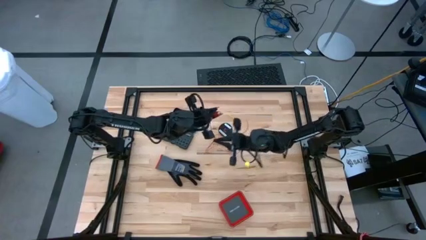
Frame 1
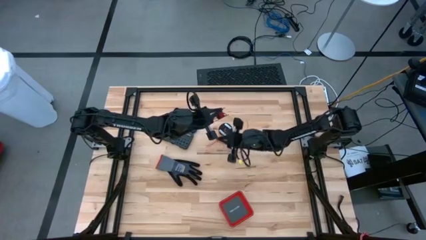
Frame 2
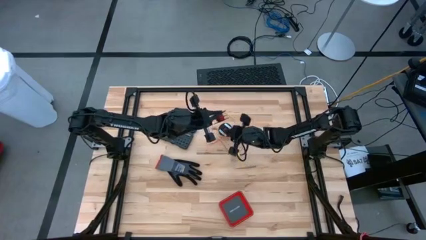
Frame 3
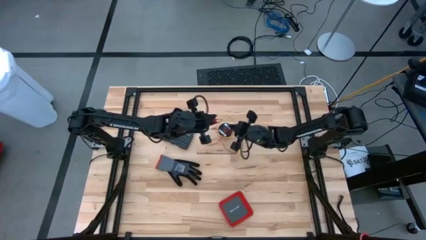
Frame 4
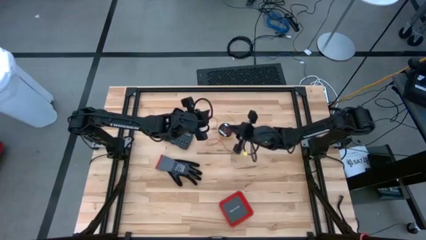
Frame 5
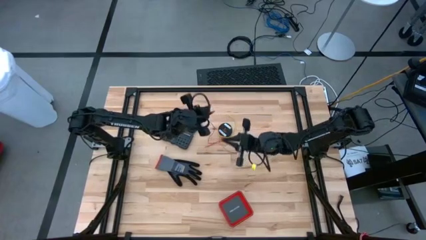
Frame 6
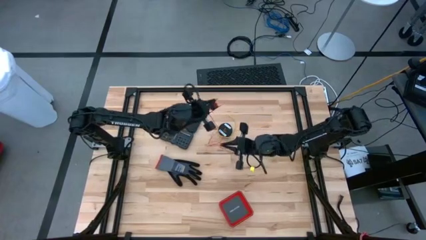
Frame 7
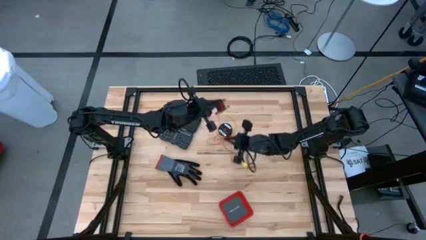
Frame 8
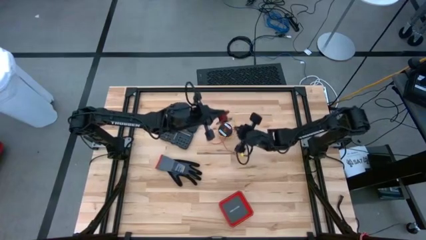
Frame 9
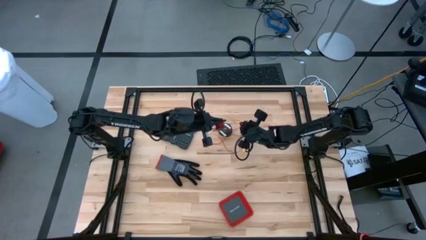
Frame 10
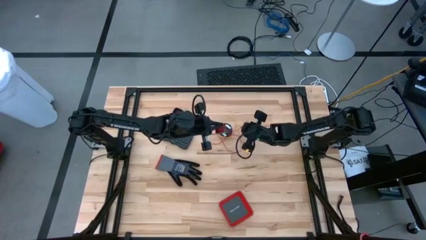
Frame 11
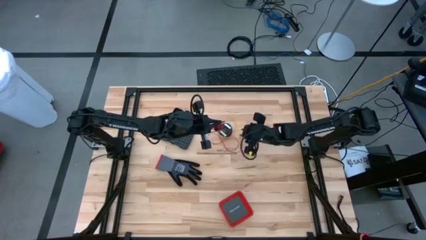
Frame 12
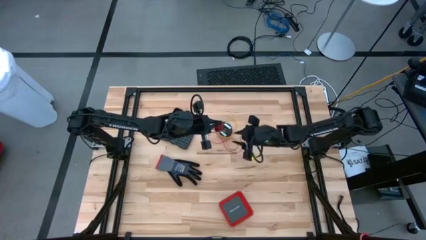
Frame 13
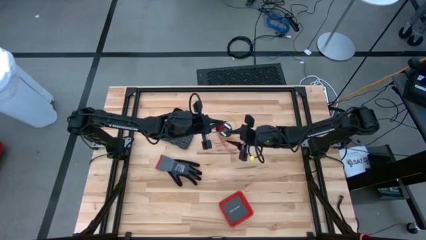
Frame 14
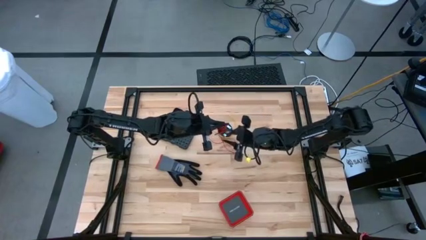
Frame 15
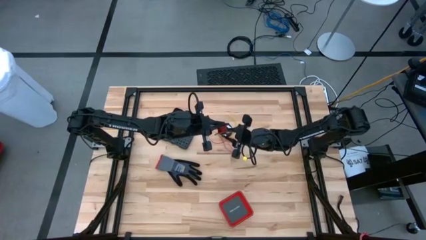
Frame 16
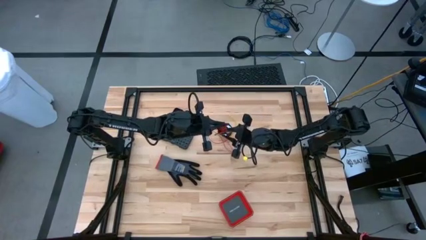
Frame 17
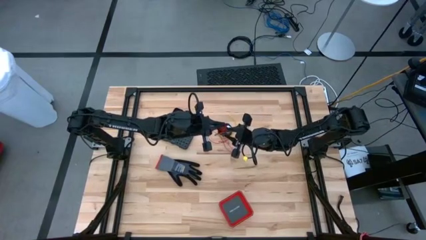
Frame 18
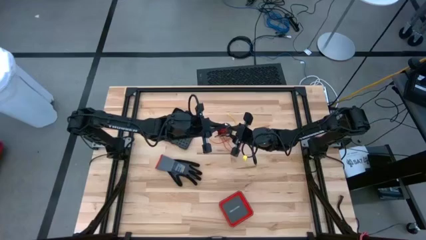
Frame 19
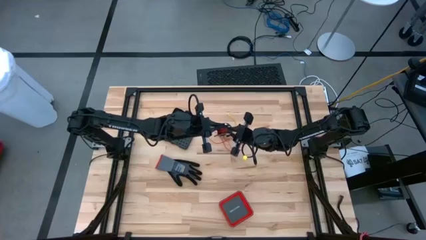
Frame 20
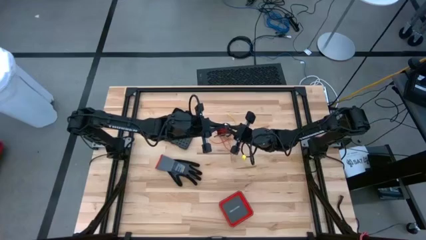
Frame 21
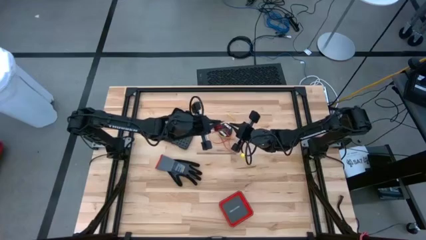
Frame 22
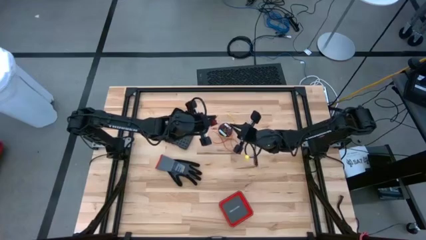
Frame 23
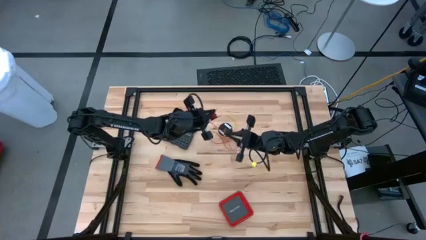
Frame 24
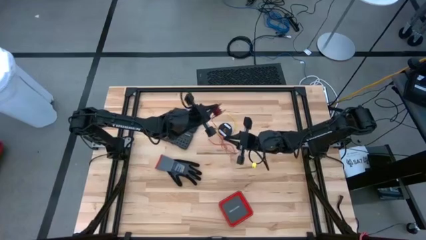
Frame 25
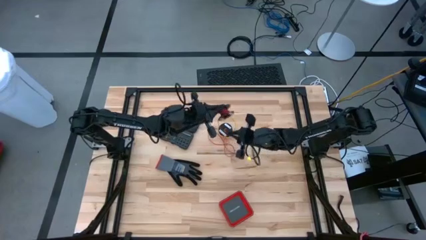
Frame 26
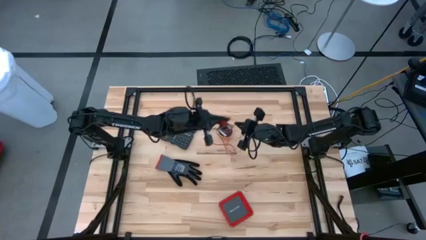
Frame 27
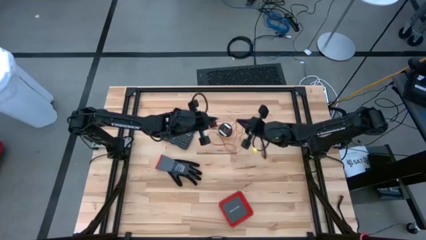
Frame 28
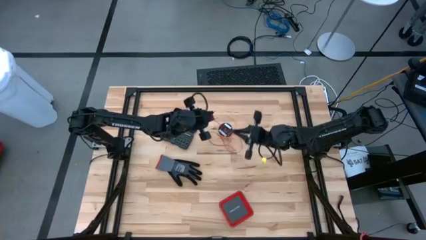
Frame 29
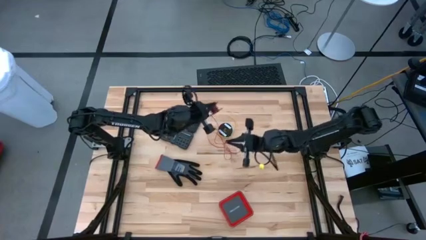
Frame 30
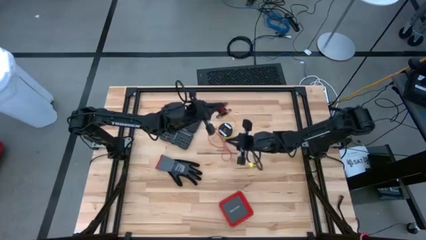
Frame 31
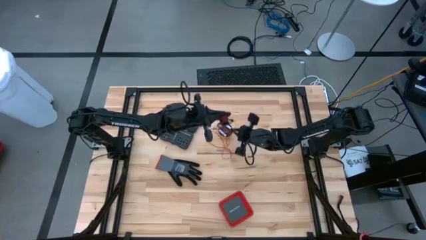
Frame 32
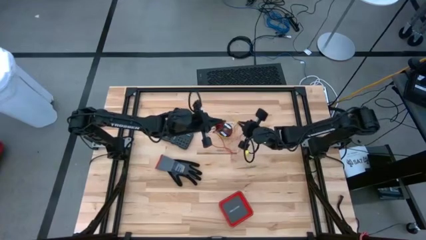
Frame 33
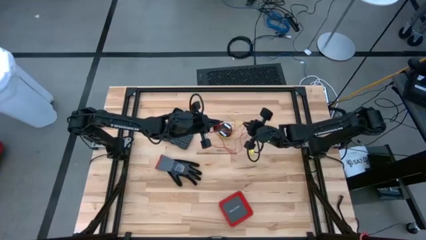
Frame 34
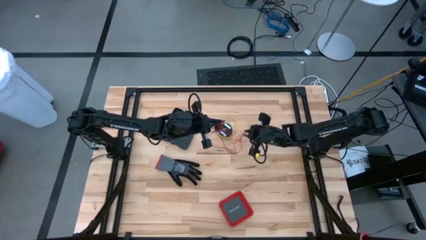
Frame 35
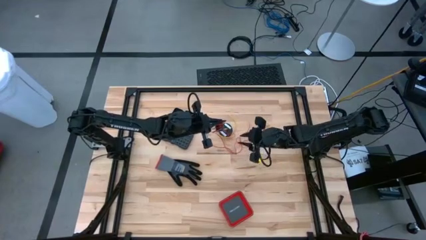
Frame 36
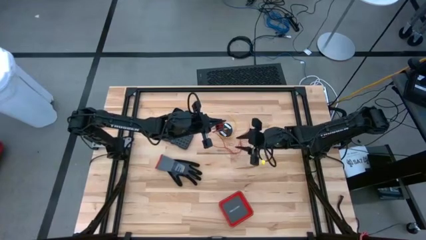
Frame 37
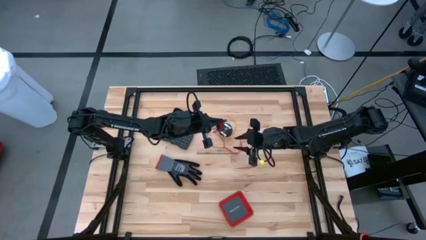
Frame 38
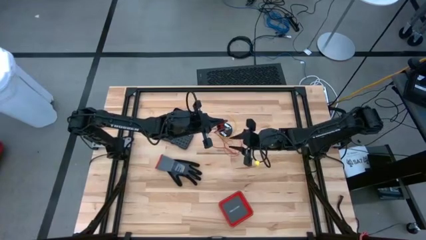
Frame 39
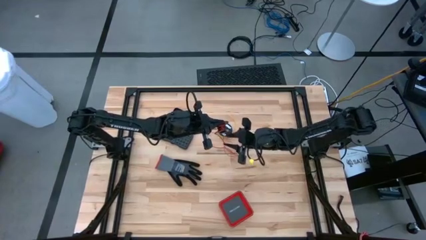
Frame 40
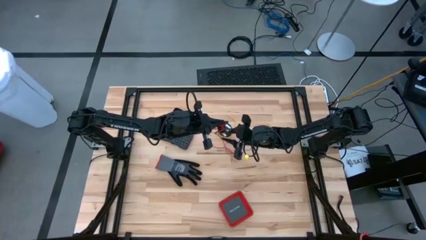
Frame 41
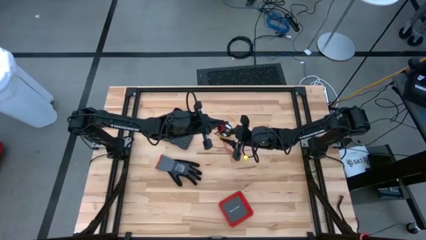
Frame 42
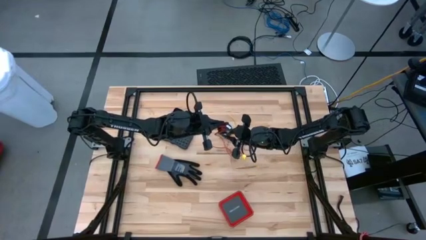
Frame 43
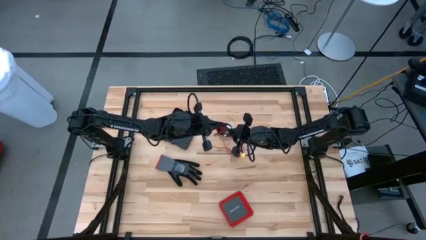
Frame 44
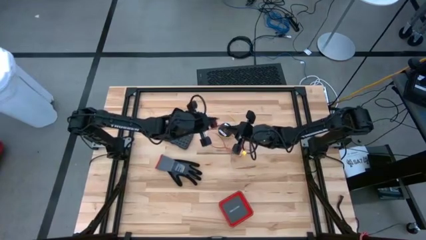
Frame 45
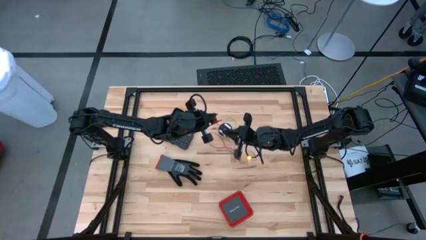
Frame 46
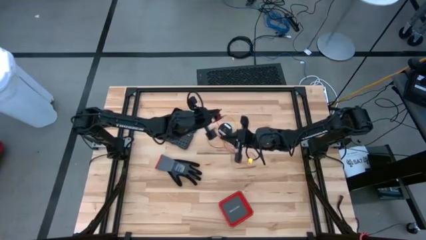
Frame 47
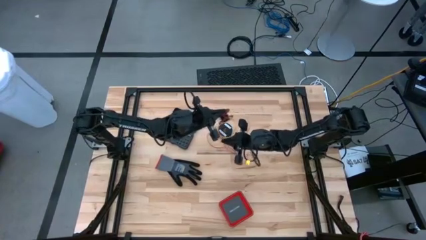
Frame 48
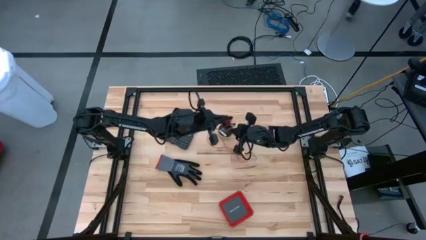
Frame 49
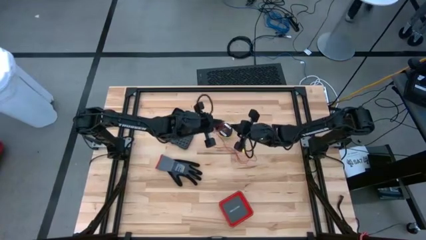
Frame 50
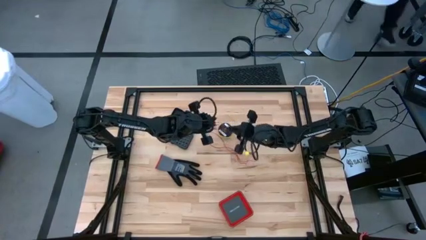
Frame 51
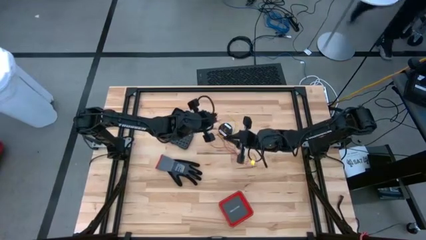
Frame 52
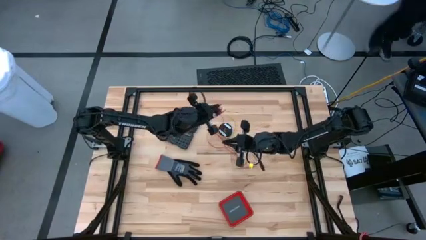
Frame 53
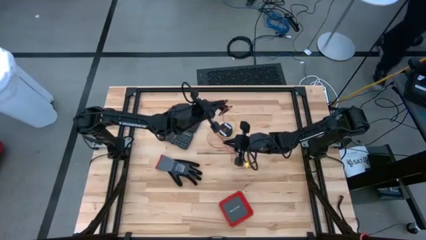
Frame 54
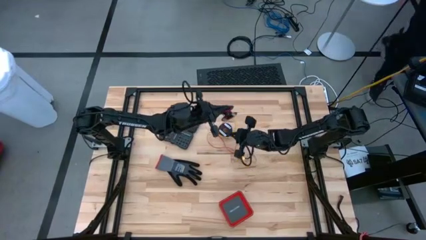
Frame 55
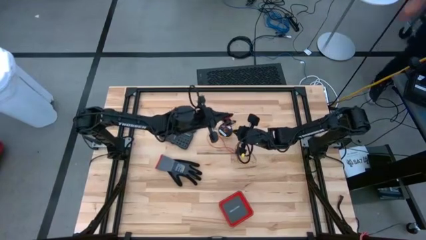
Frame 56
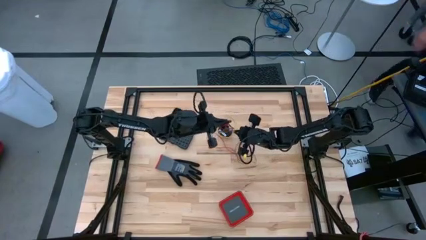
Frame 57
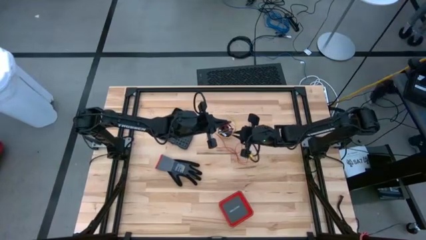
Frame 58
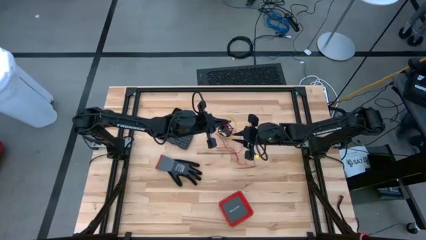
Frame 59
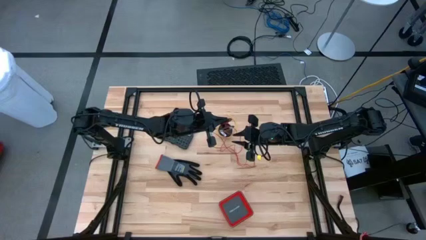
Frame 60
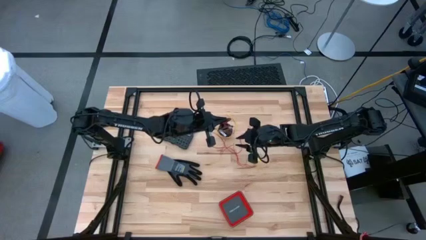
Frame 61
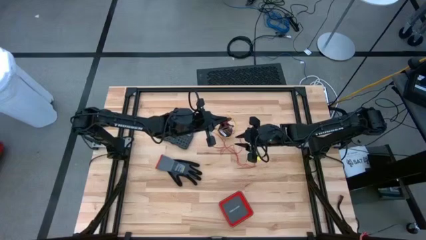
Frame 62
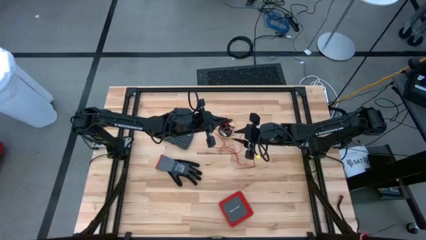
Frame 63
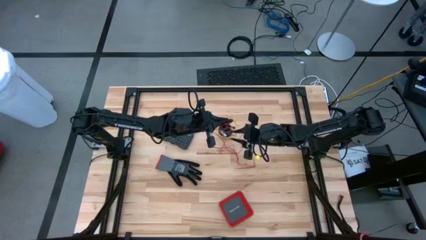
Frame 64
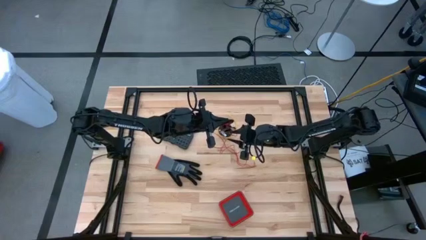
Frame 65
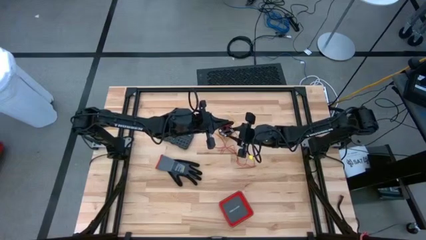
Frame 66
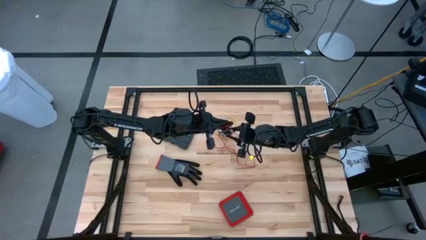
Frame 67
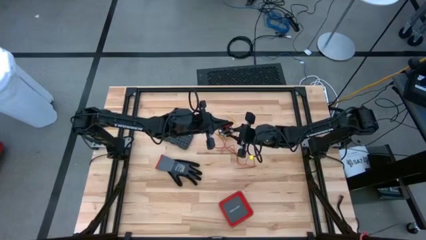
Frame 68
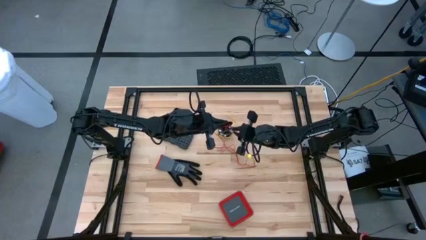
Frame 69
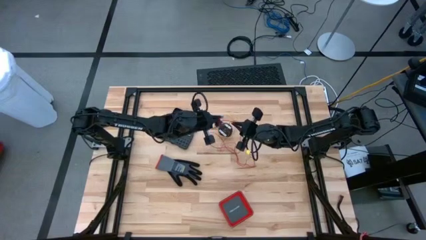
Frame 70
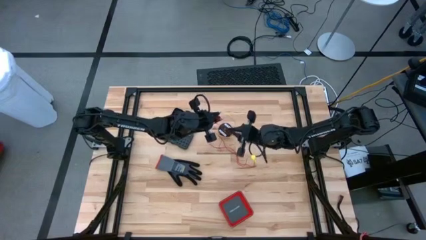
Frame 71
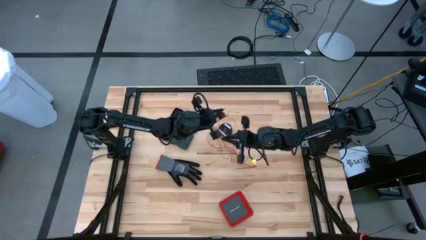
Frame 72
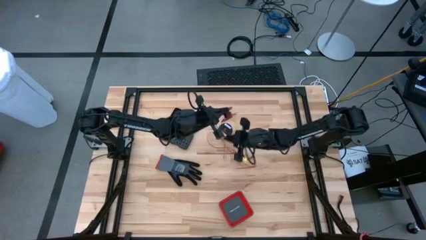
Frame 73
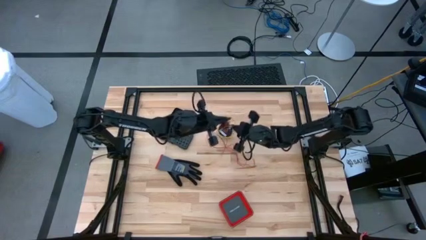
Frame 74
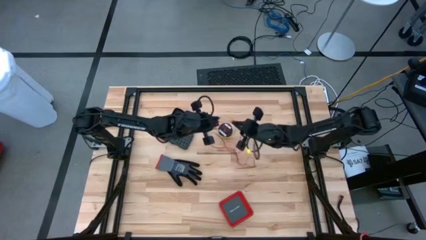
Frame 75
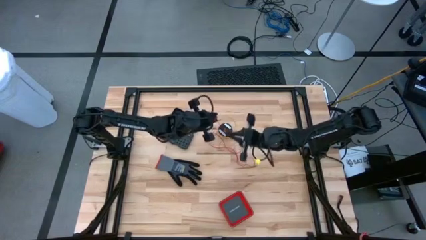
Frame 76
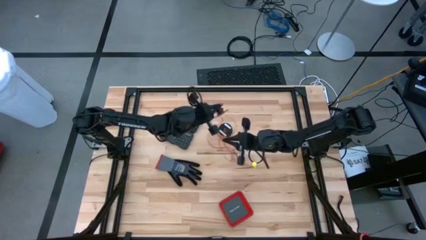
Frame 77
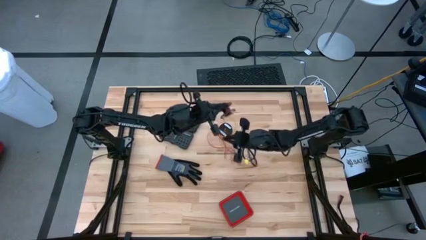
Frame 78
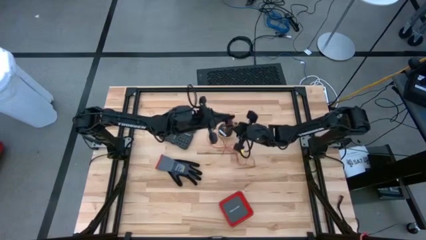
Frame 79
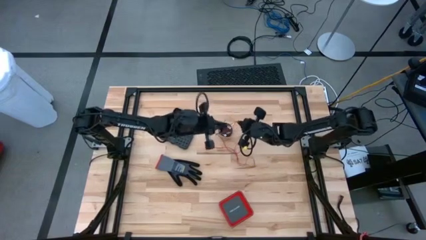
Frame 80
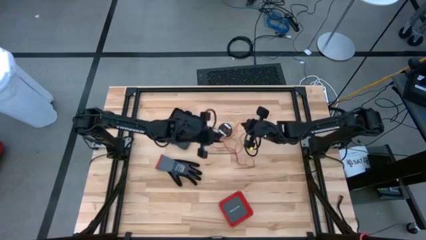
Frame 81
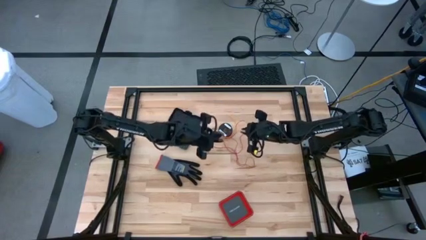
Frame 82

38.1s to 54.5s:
Task: Coil cords
Uncoil the red wire from the spool

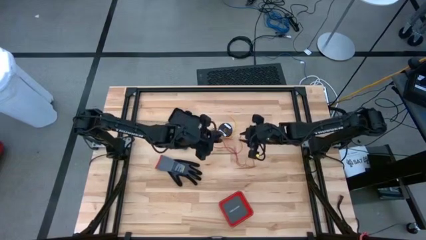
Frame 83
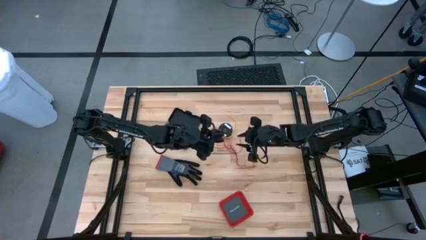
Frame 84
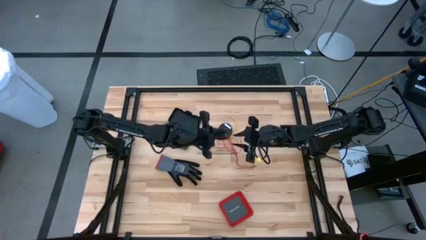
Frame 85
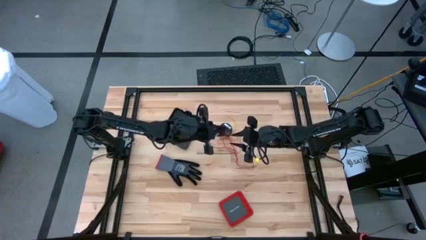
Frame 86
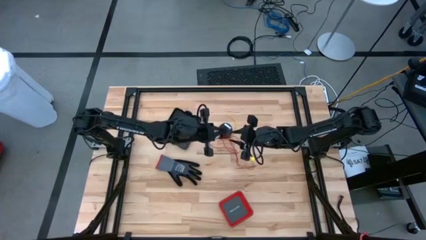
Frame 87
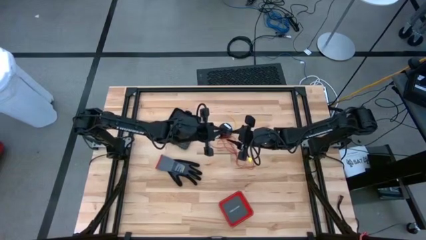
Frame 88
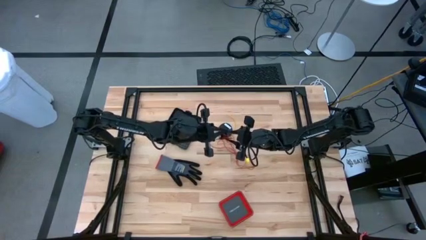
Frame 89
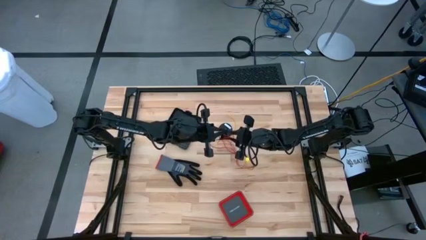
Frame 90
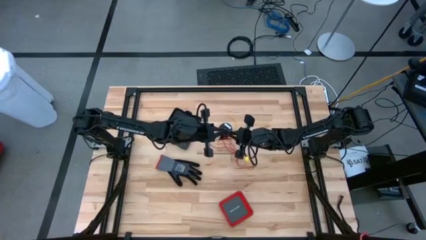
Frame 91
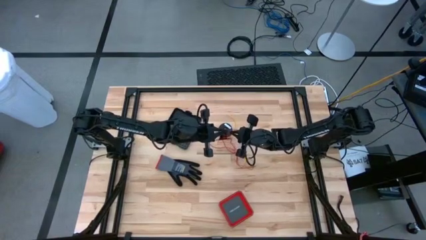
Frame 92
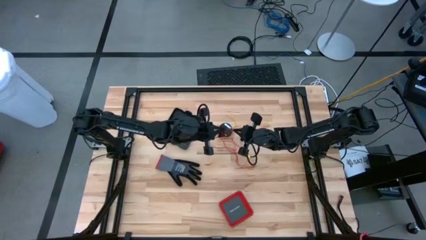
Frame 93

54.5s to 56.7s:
Uncoil the red wire from the spool
